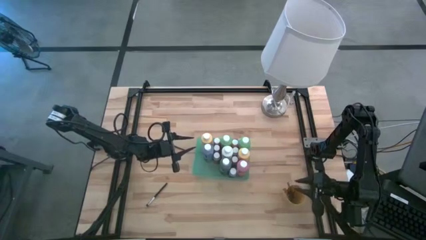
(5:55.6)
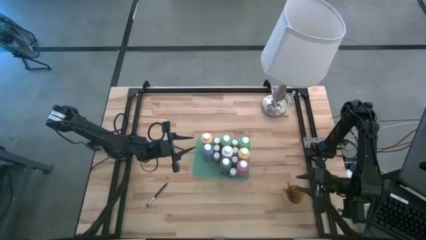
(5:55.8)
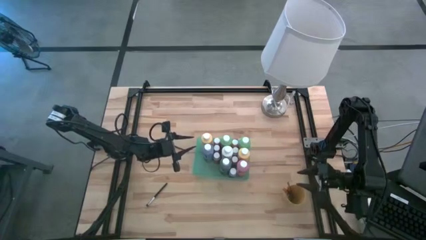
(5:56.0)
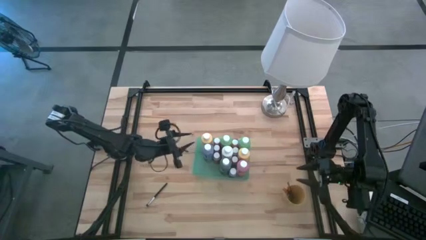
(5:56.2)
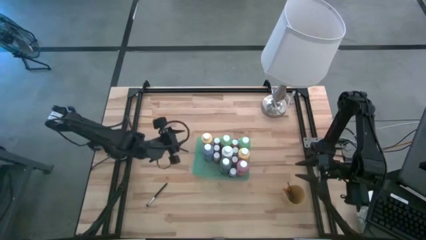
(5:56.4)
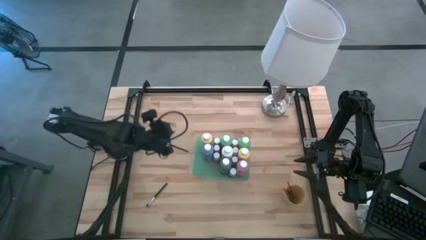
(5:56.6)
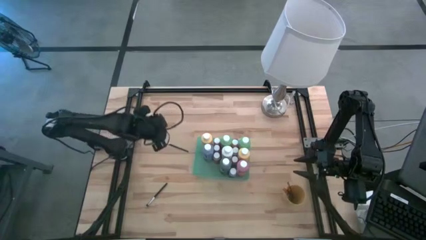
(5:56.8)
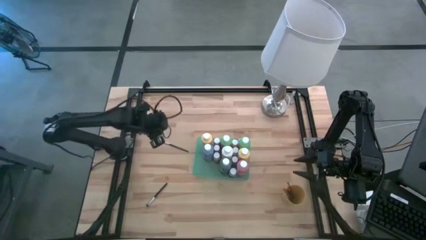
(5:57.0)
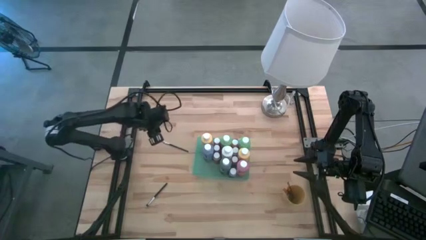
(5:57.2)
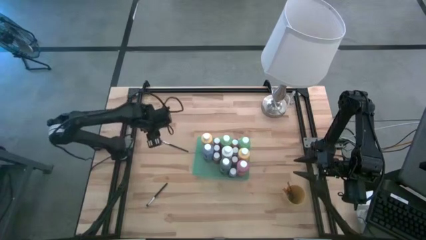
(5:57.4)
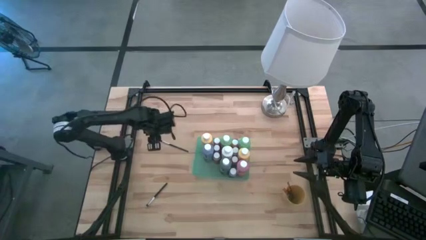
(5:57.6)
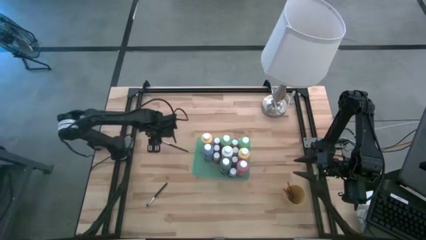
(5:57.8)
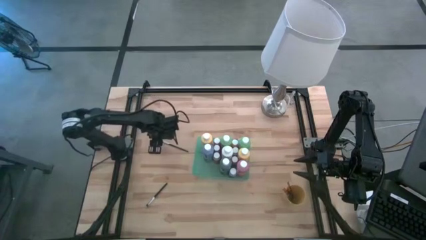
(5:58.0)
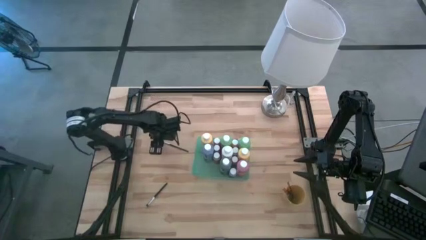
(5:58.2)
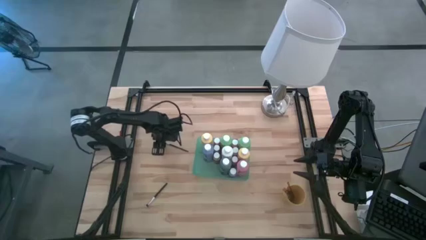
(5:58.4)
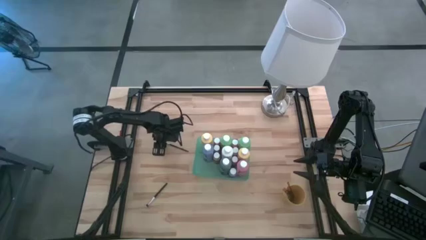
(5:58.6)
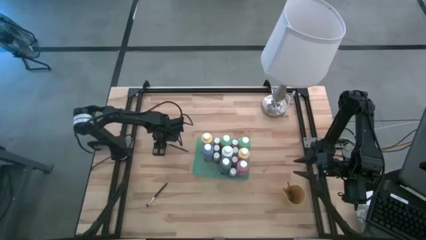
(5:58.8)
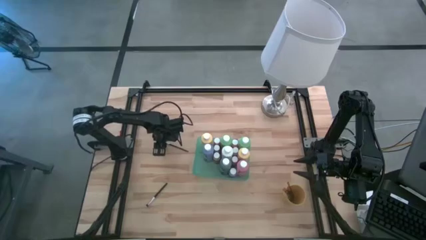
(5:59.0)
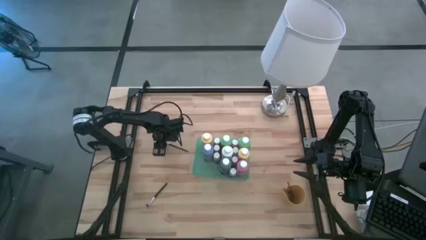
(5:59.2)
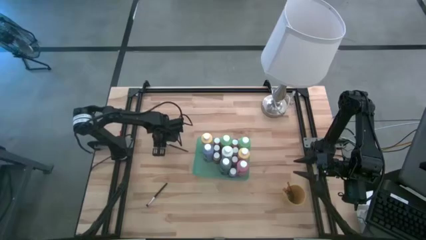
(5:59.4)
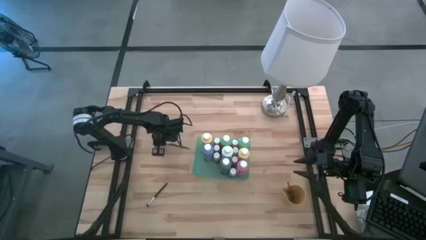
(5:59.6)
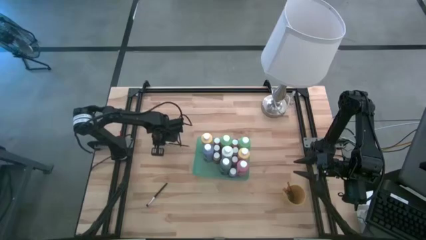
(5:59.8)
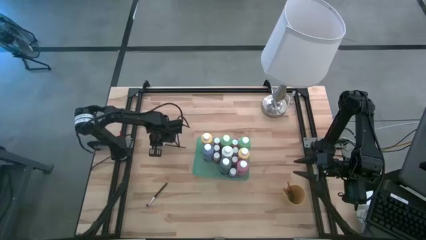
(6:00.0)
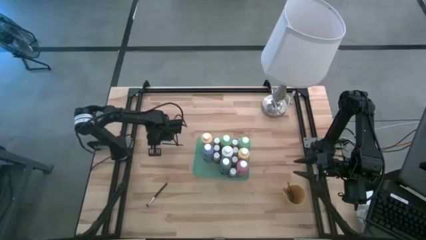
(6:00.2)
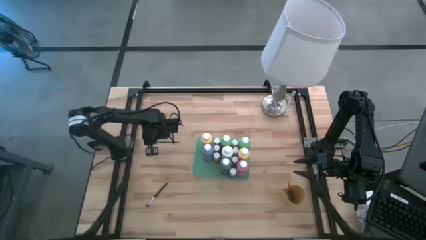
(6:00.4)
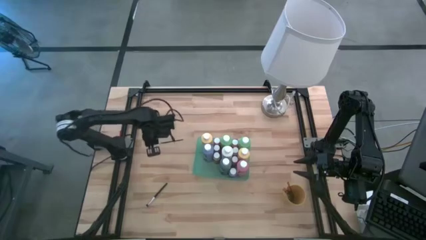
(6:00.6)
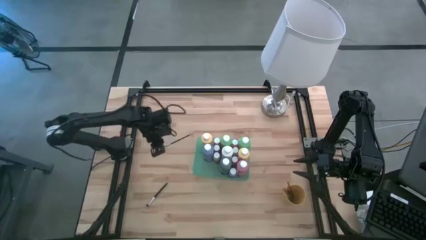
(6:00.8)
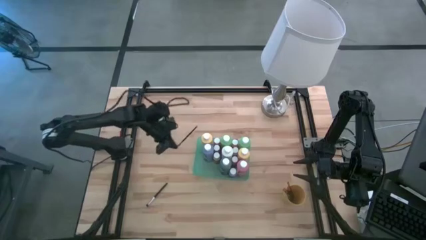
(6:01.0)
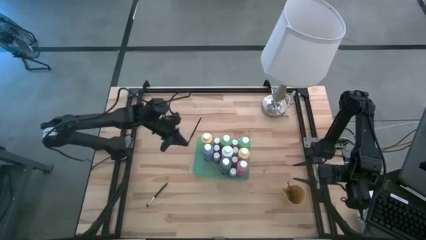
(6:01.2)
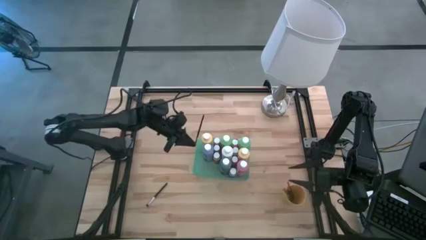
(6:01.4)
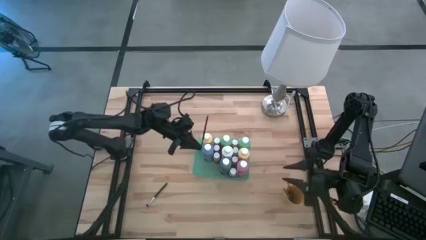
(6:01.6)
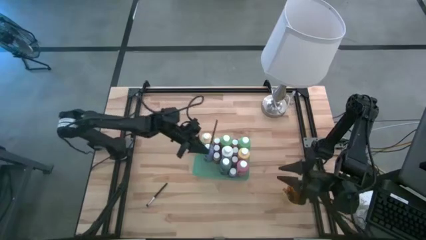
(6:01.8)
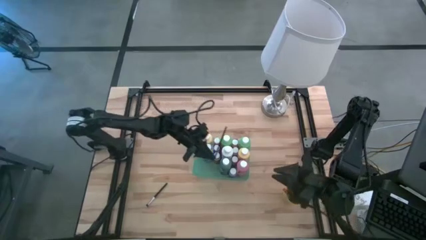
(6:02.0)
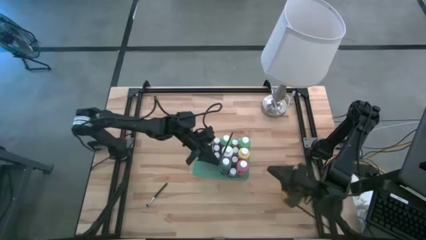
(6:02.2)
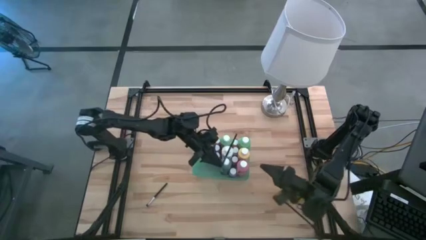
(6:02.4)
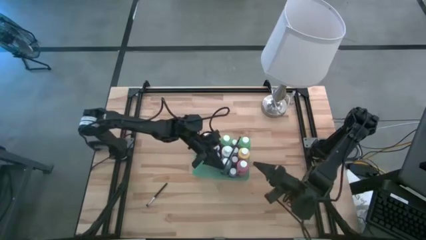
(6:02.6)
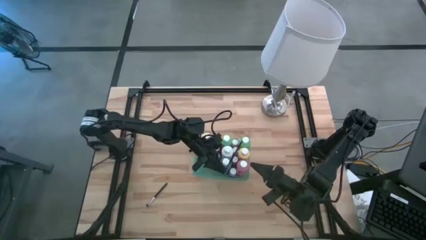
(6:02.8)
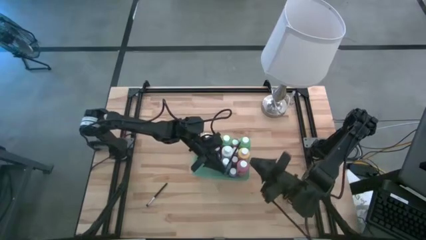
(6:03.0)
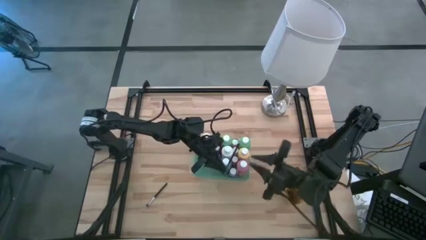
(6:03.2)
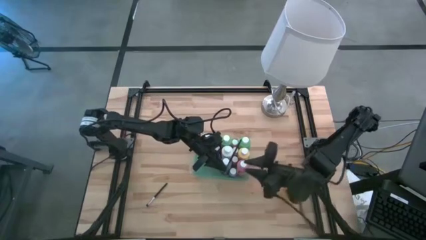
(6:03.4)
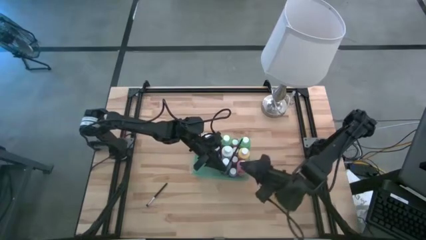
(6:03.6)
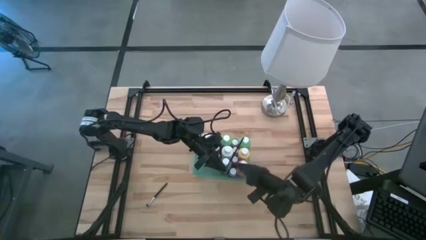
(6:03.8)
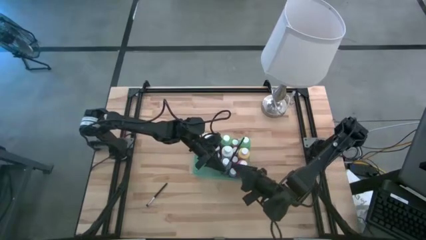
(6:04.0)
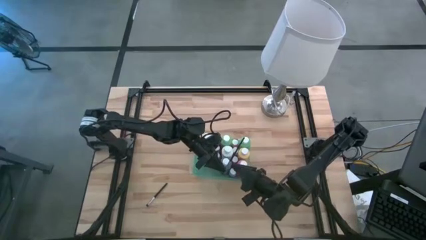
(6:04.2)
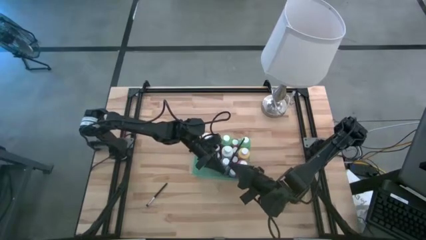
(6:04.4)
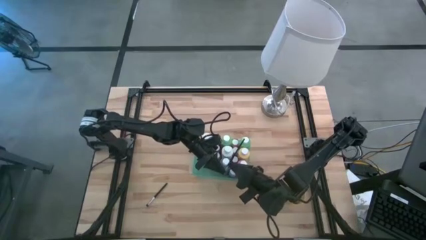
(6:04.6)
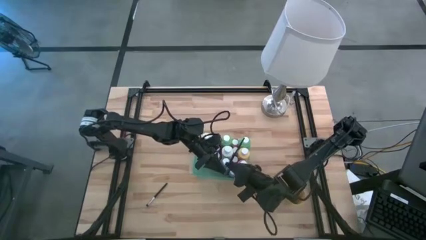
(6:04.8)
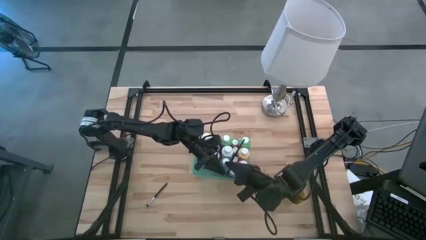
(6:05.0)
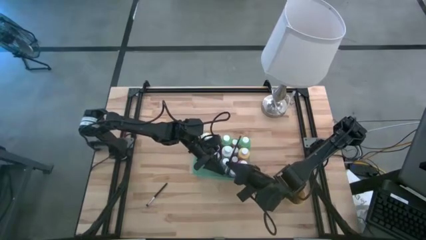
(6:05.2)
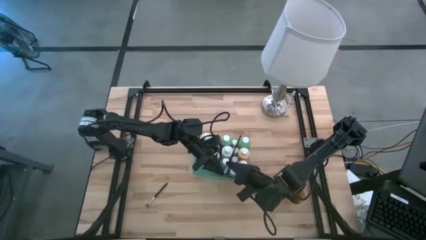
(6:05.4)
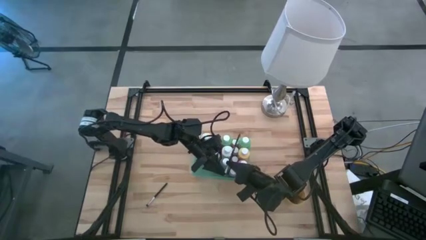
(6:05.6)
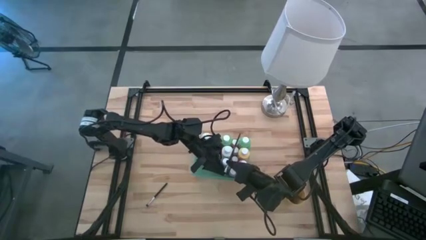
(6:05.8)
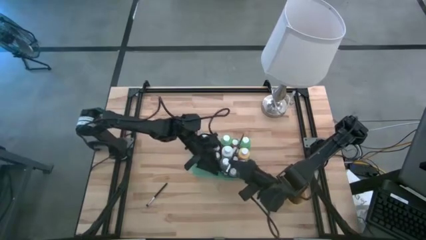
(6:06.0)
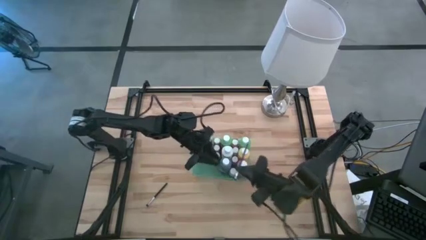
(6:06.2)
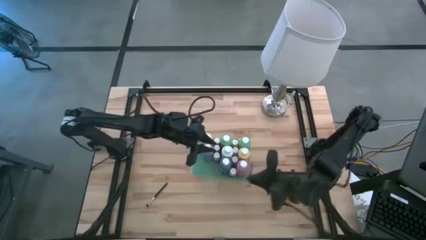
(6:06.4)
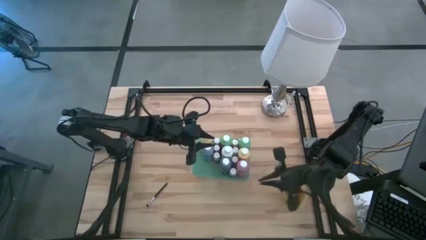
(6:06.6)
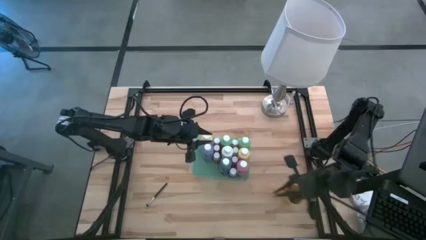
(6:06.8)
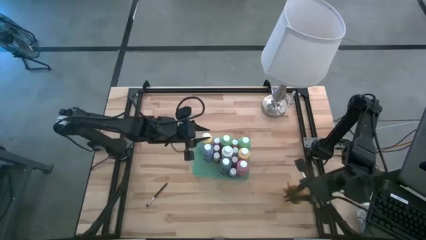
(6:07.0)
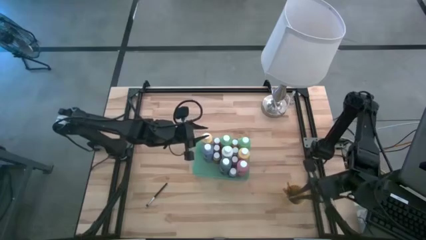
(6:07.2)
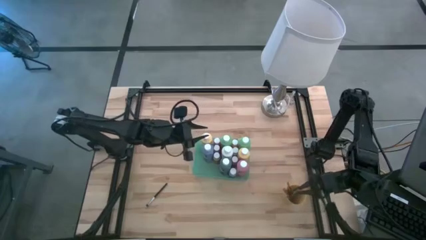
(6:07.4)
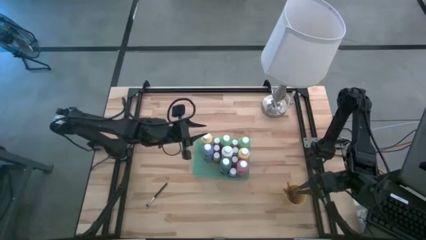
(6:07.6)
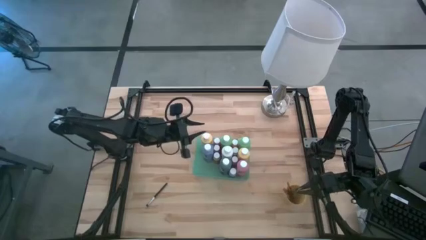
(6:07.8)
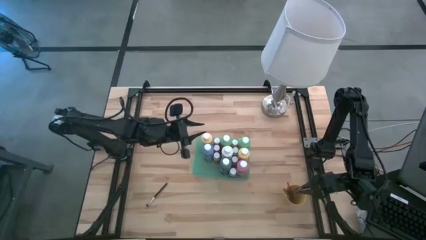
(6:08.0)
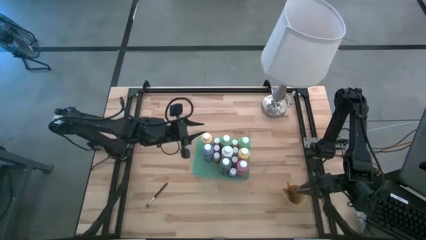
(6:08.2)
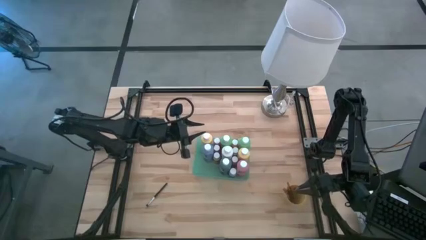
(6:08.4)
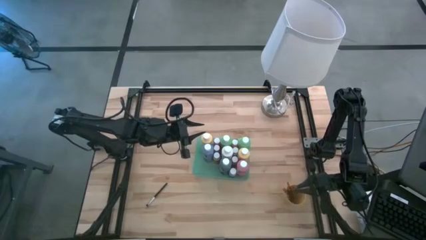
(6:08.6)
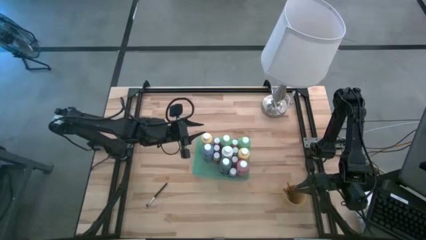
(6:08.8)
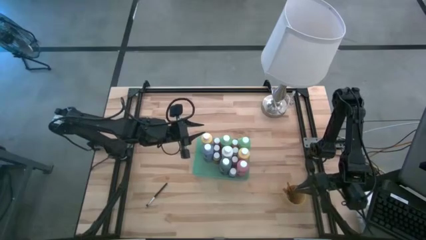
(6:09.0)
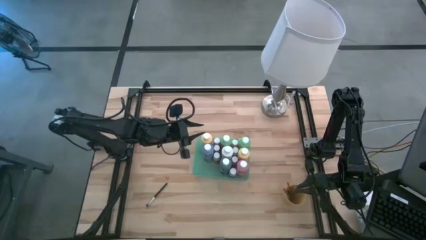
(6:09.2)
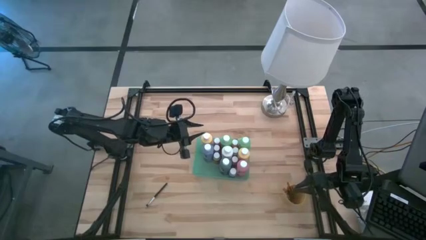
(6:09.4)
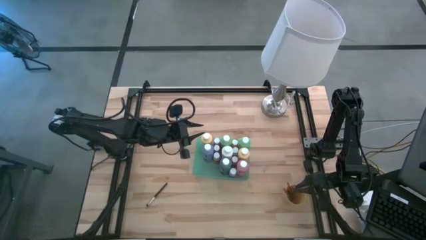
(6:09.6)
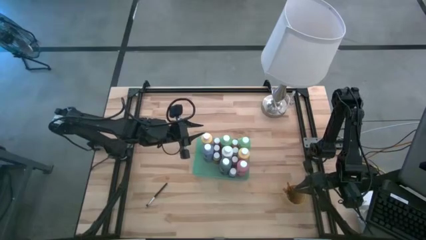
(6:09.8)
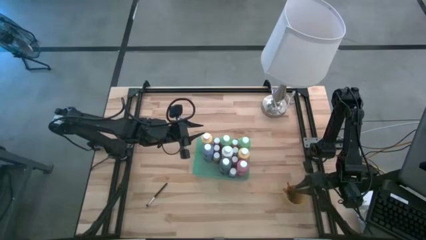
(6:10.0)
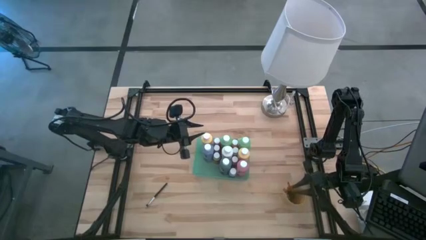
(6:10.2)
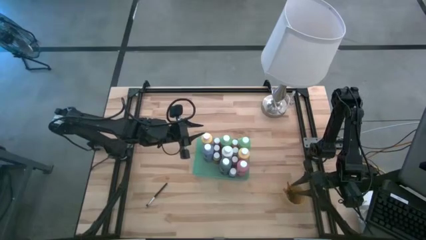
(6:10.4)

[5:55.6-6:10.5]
Task: Pick & Place Paint Supplies
Put the silver paintbrush into the yellow cup
